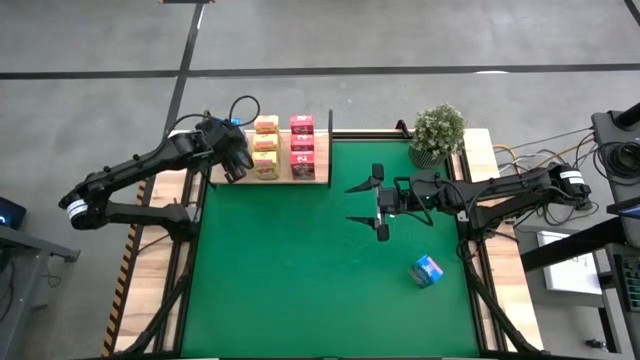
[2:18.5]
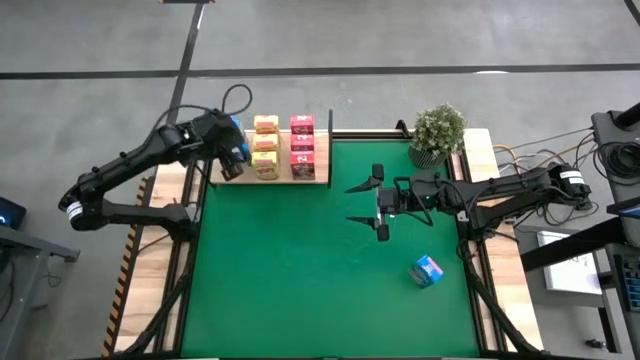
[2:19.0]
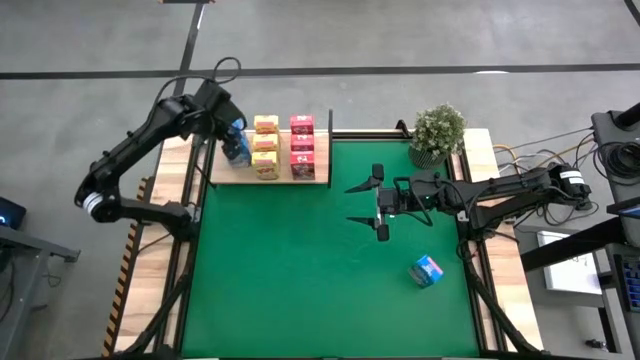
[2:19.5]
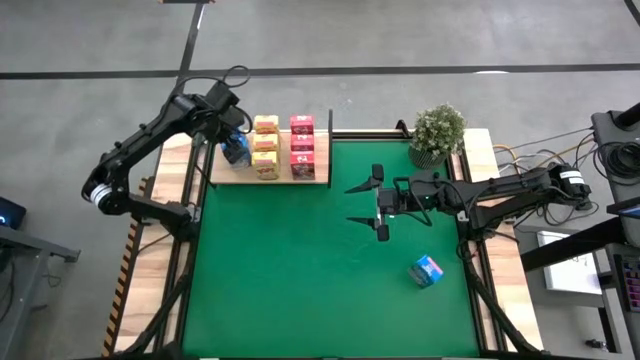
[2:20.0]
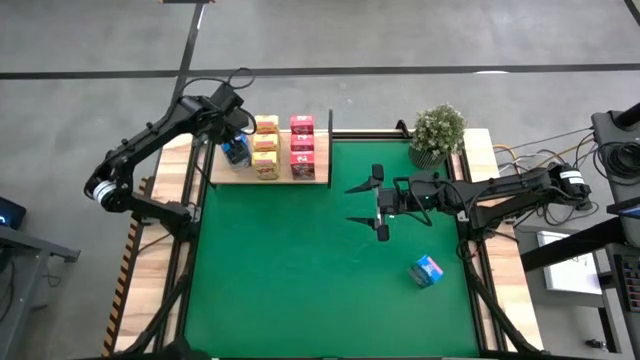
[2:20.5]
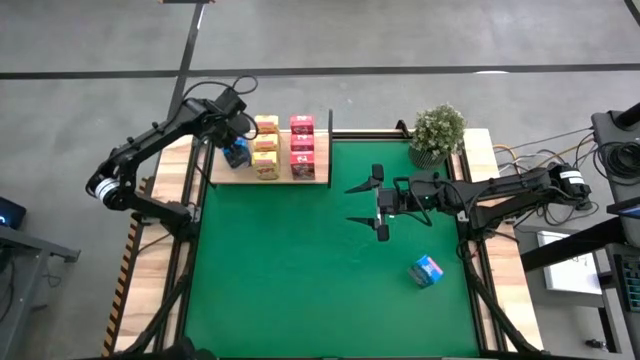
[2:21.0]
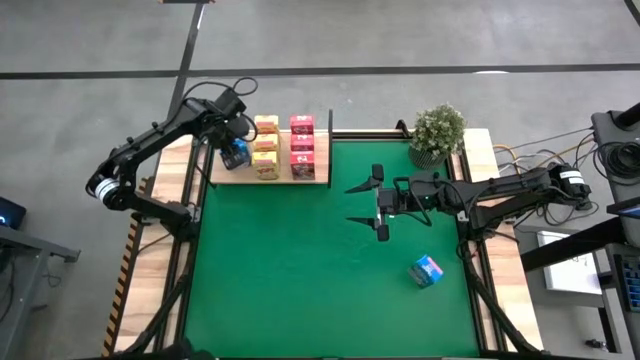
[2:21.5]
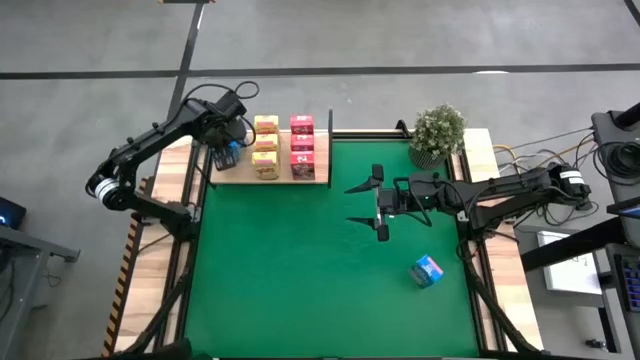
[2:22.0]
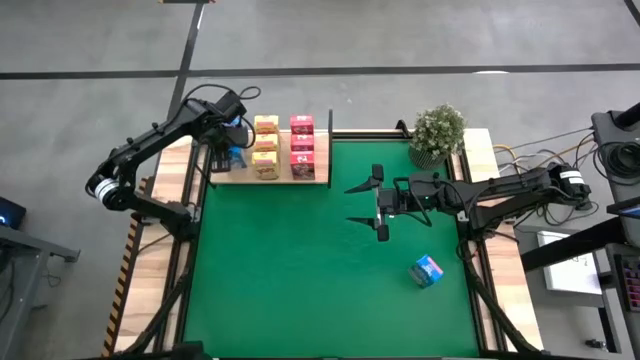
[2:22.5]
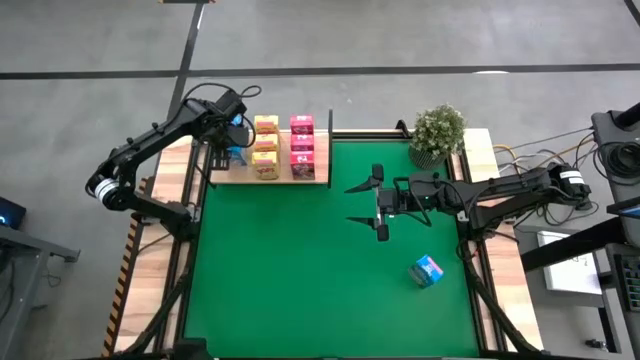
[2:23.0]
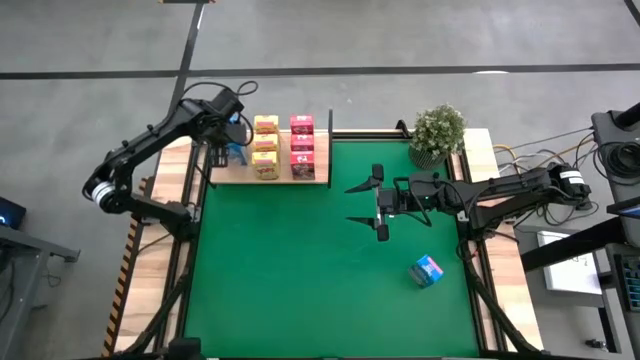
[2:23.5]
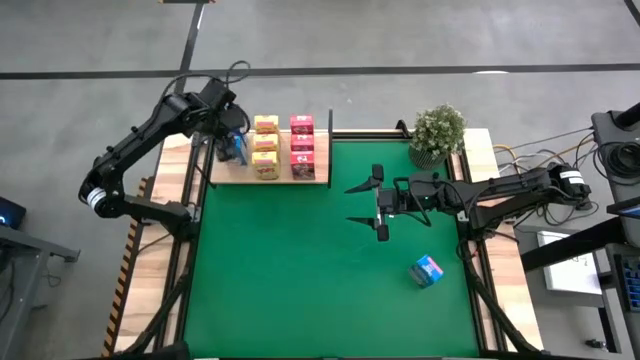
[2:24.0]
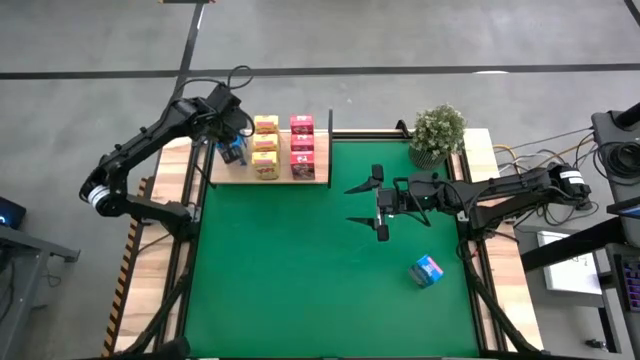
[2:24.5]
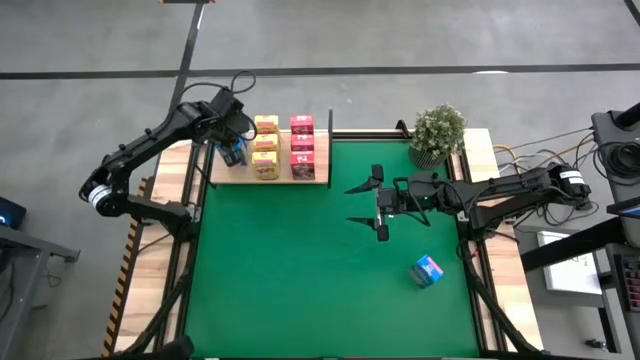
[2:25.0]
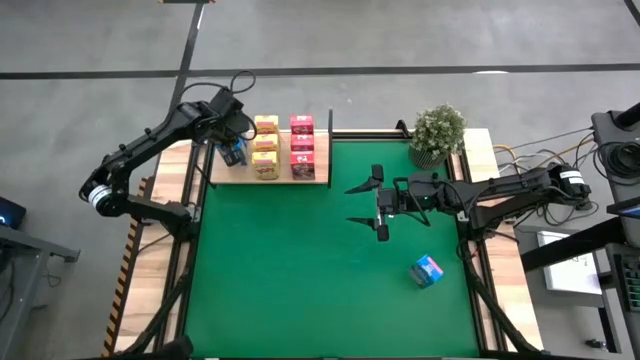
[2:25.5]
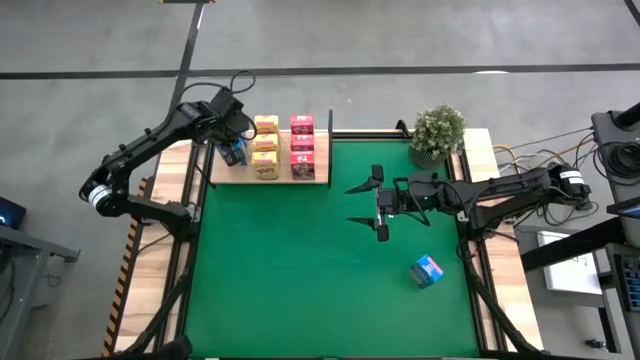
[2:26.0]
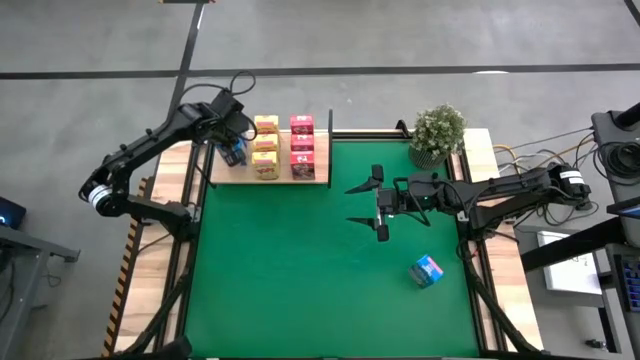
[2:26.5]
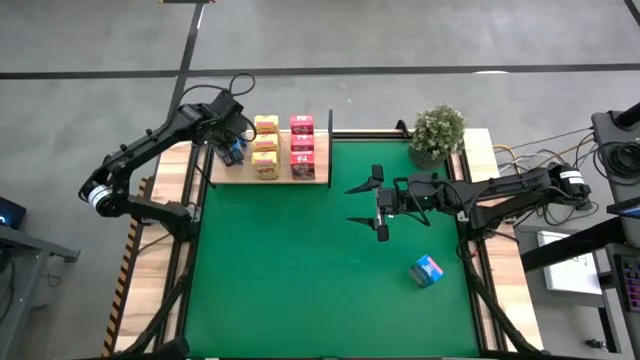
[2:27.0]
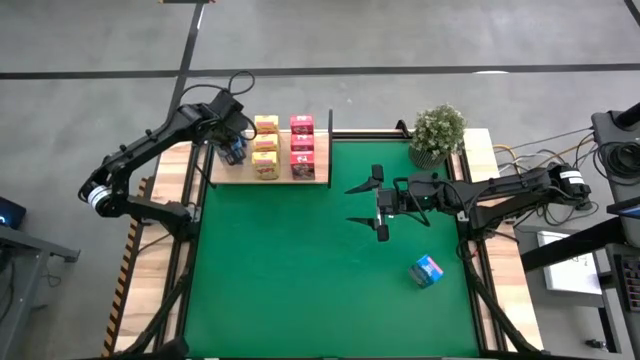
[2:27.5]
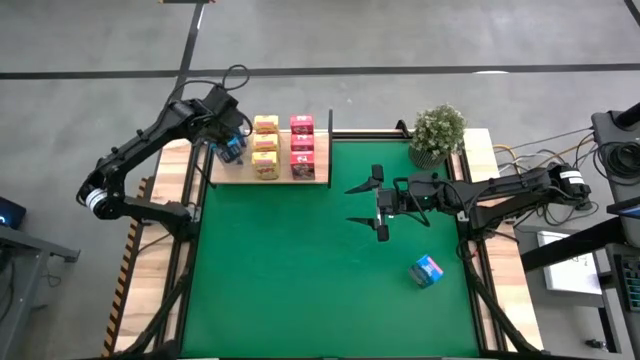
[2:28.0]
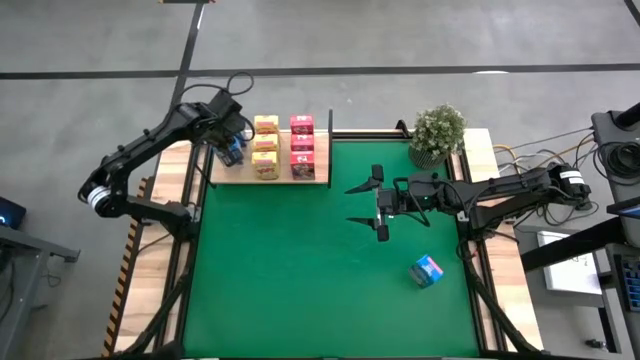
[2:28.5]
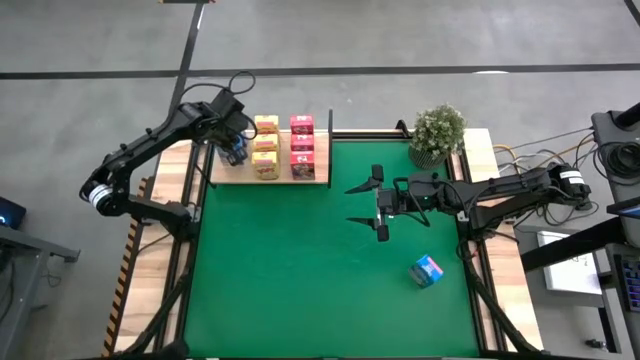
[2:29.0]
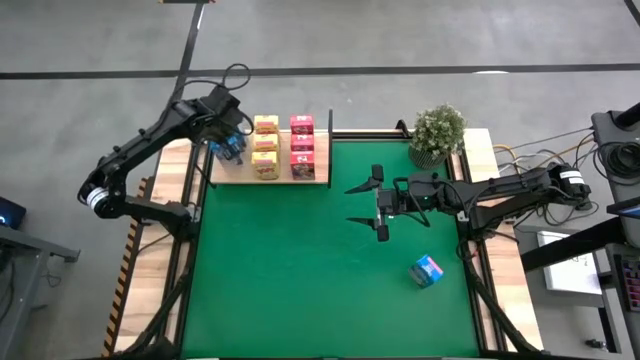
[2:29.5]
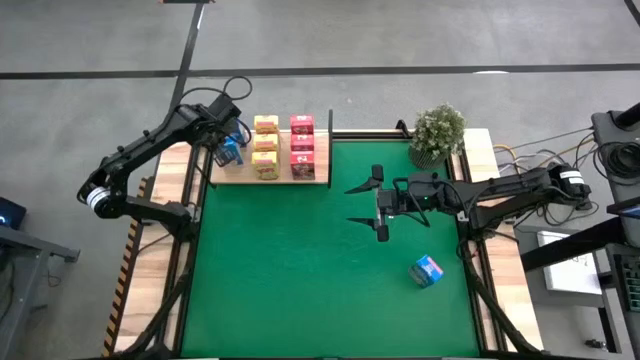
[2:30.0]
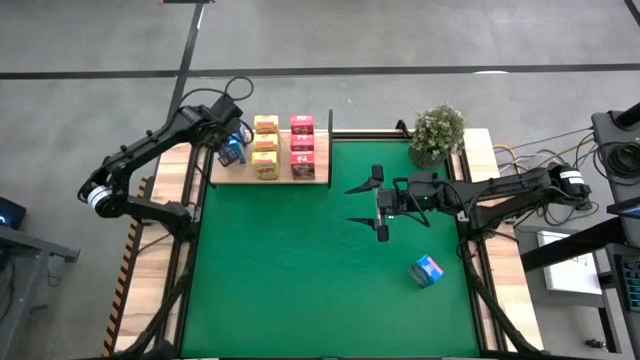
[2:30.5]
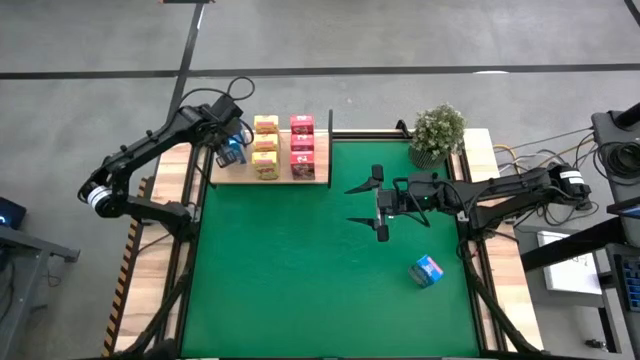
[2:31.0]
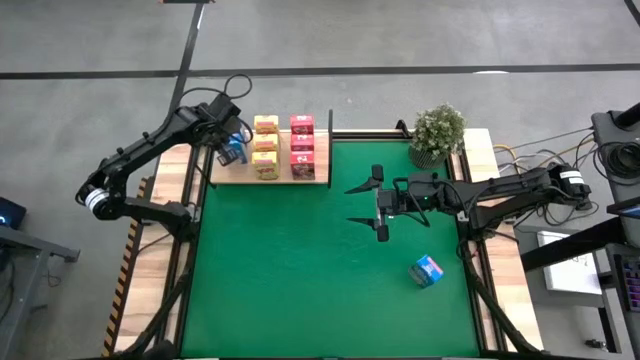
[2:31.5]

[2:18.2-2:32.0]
Task: Stack cereal on shelf
Put the top blue cereal box aligned with the blue cereal box on the shelf

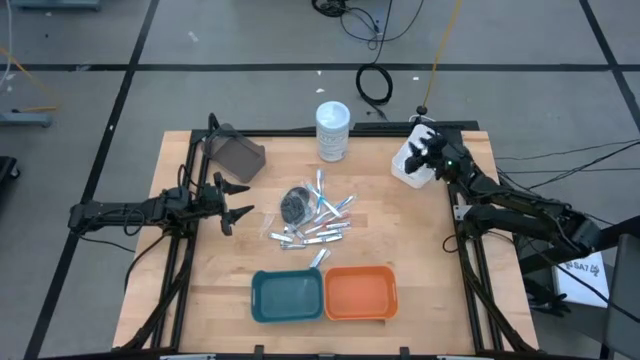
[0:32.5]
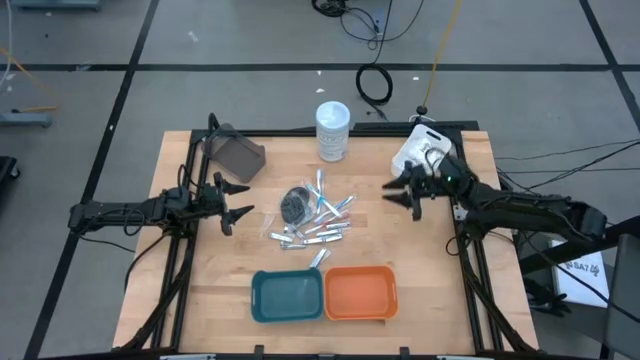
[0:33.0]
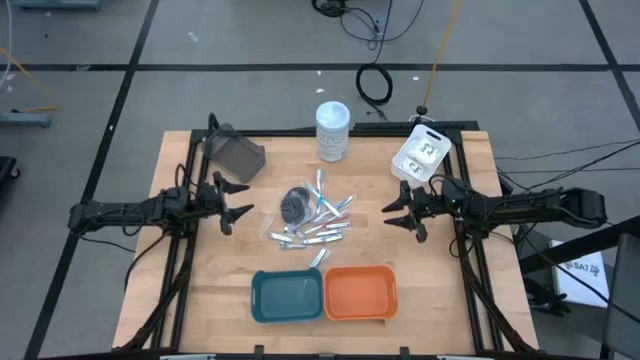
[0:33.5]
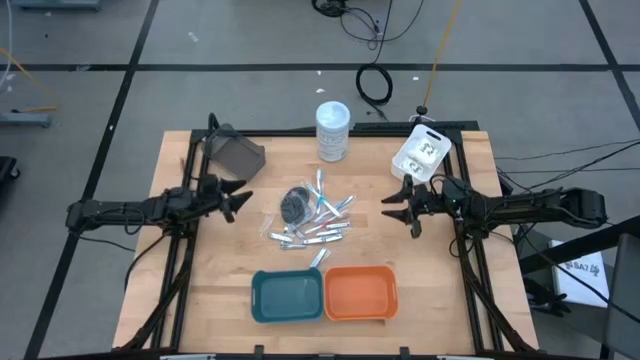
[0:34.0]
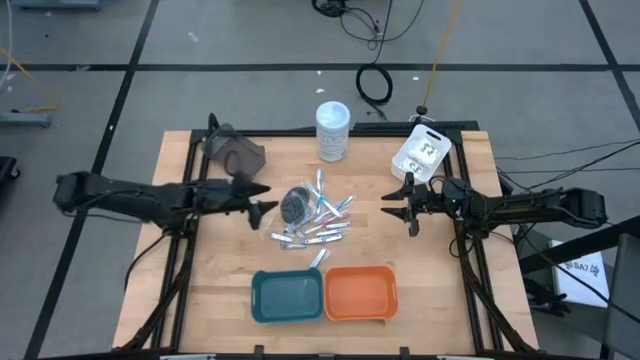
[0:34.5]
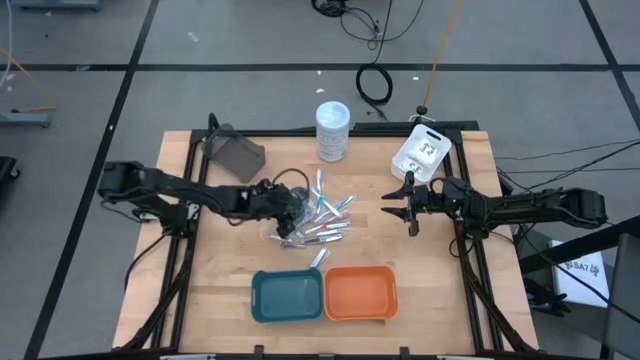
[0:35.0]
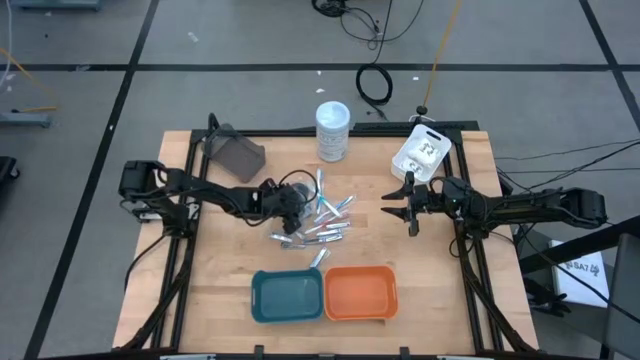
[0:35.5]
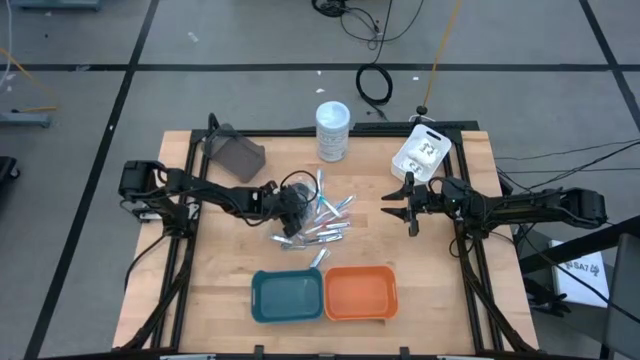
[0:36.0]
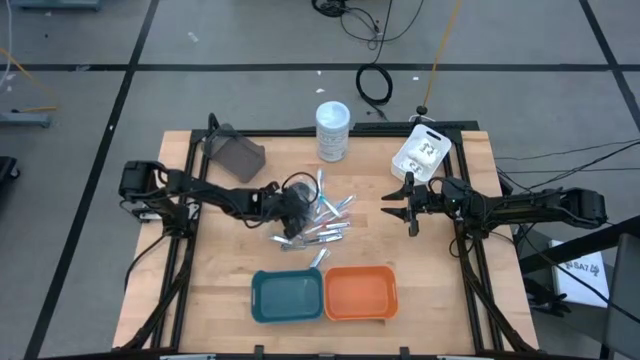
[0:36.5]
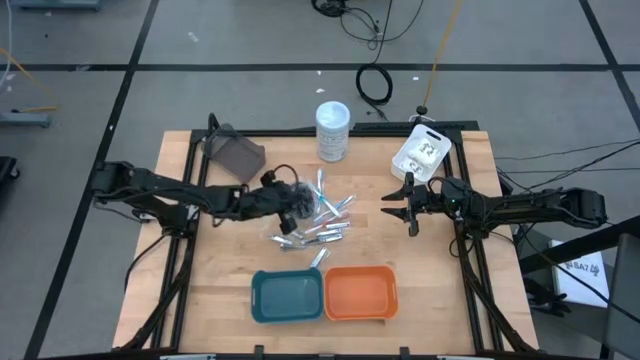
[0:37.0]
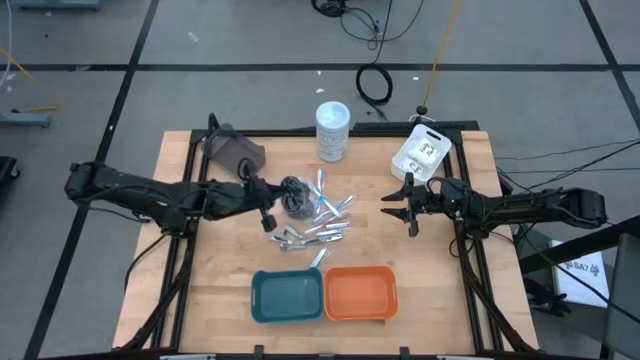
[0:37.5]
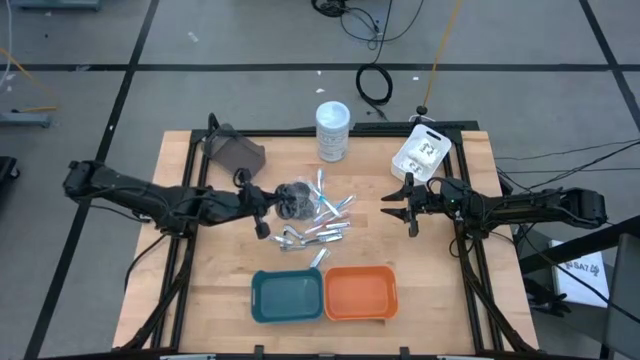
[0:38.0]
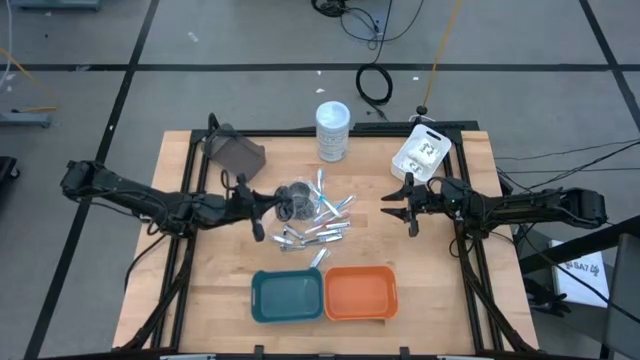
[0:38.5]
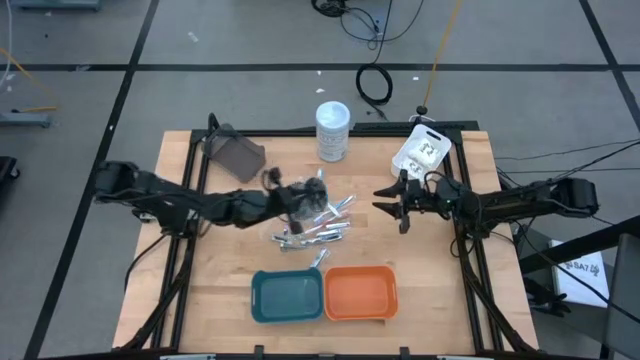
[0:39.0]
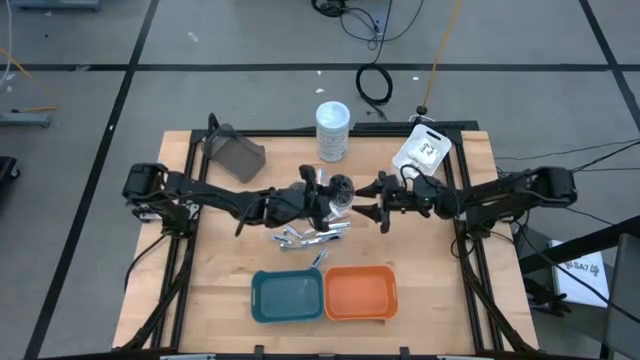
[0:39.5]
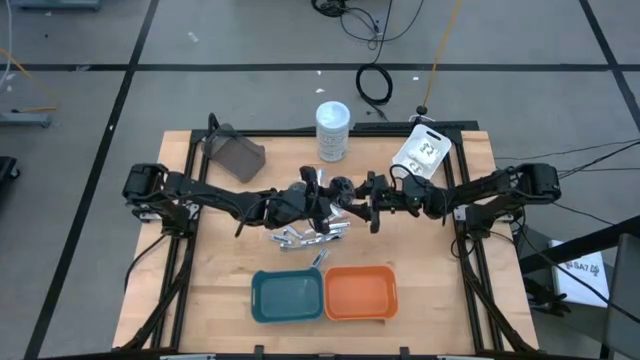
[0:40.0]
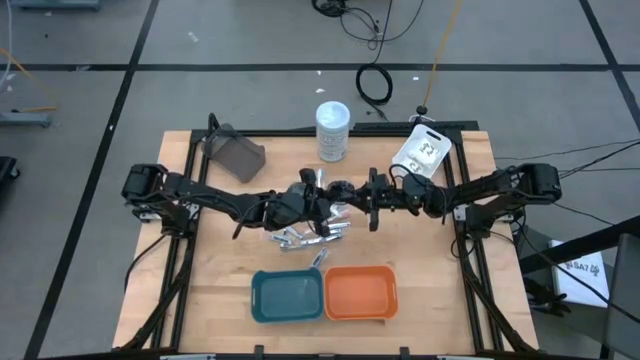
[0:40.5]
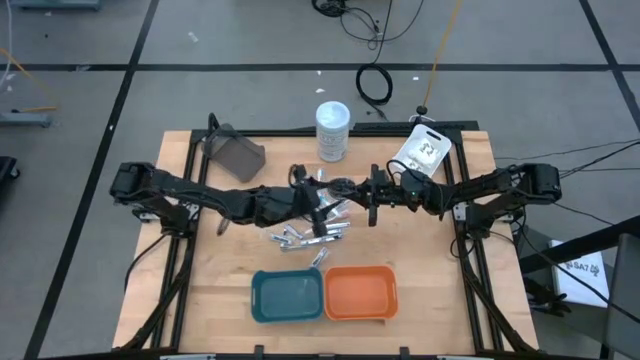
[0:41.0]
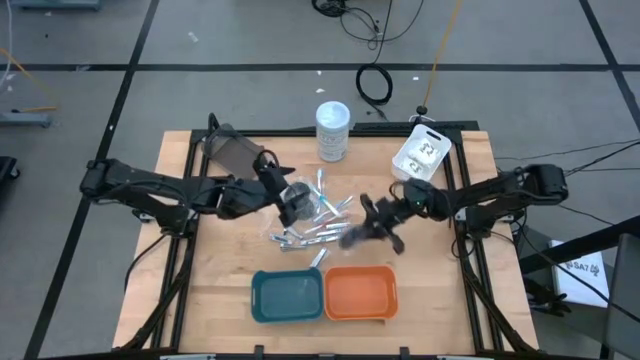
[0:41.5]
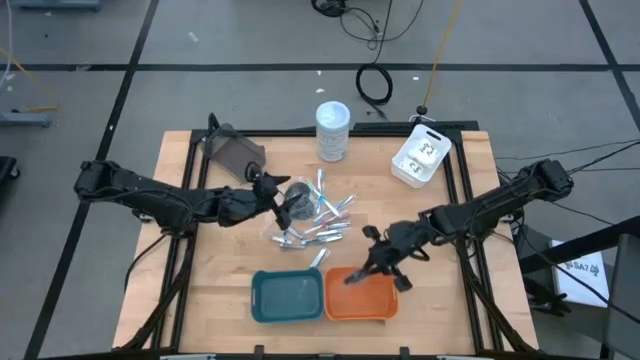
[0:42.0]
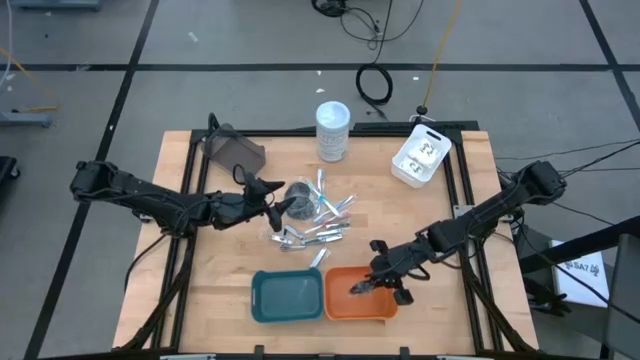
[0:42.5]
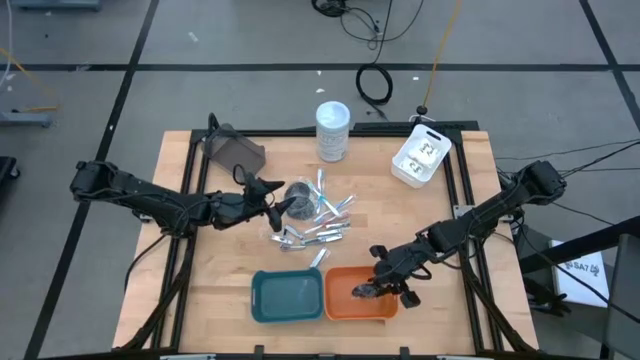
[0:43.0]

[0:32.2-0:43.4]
Task: Pick & Place Travel size toiletries
Put the black hairbrush into the orange bin
